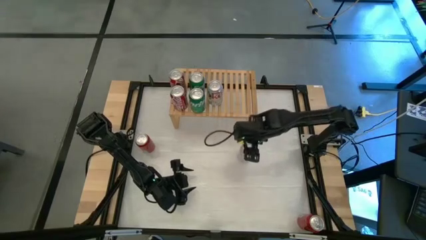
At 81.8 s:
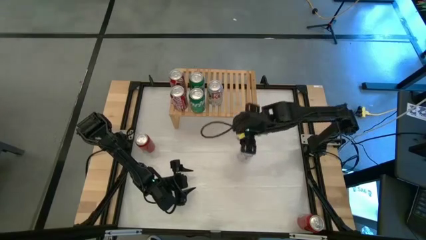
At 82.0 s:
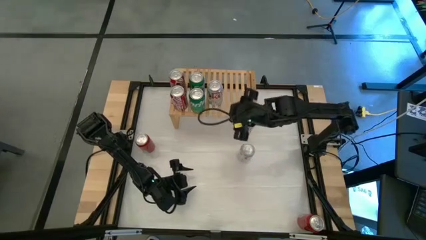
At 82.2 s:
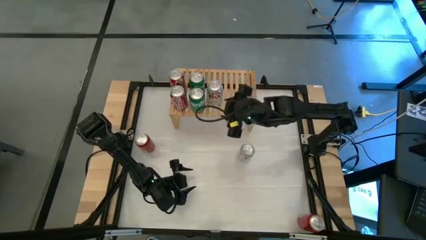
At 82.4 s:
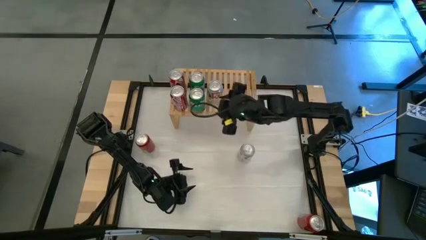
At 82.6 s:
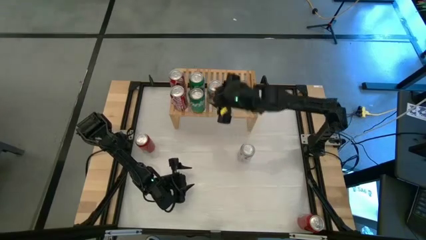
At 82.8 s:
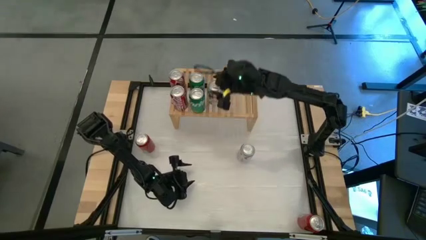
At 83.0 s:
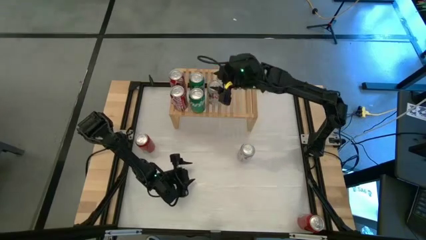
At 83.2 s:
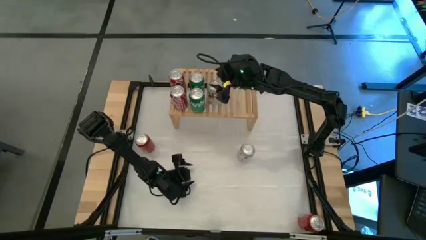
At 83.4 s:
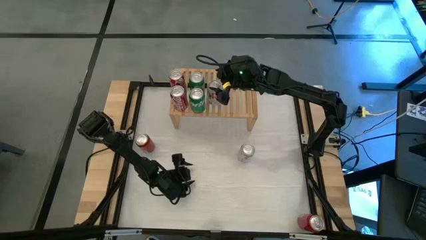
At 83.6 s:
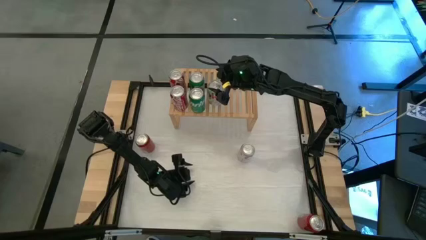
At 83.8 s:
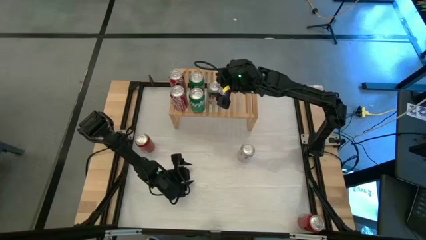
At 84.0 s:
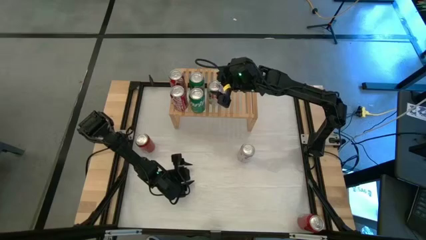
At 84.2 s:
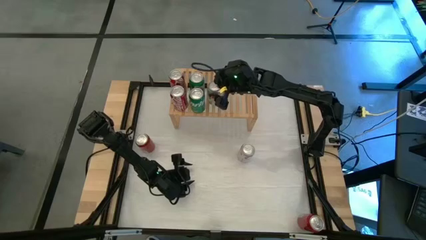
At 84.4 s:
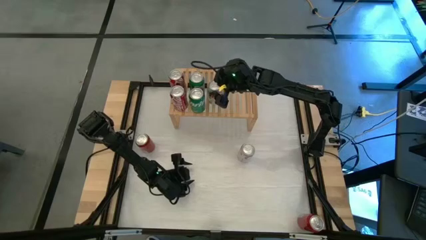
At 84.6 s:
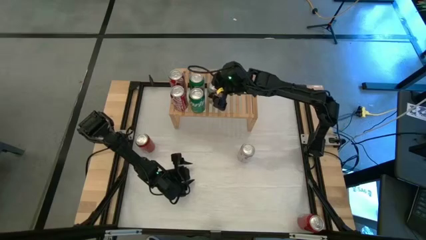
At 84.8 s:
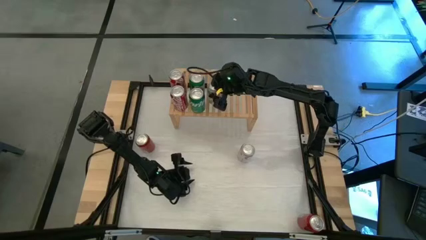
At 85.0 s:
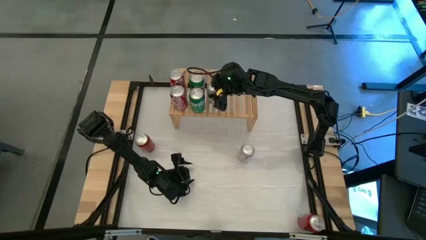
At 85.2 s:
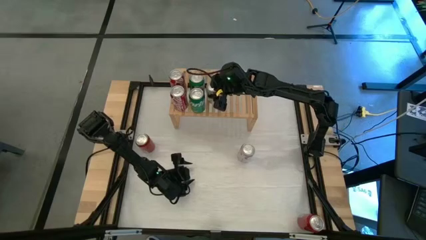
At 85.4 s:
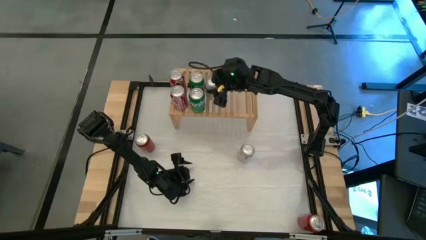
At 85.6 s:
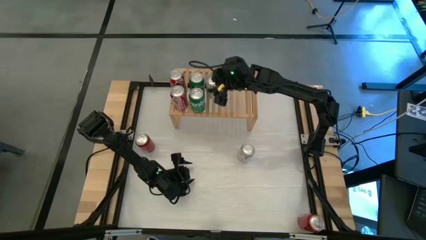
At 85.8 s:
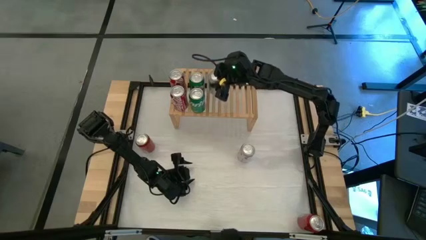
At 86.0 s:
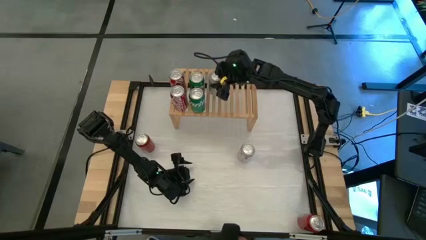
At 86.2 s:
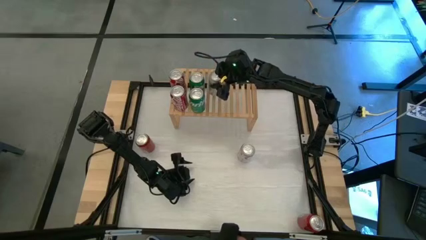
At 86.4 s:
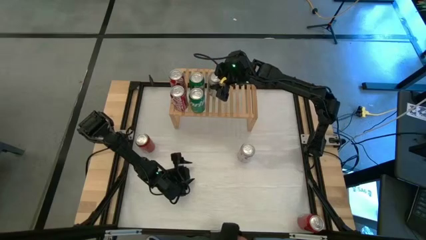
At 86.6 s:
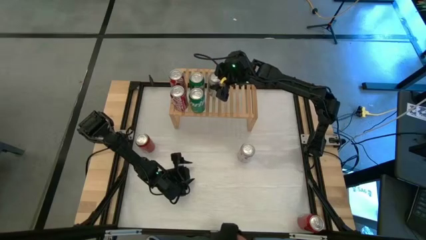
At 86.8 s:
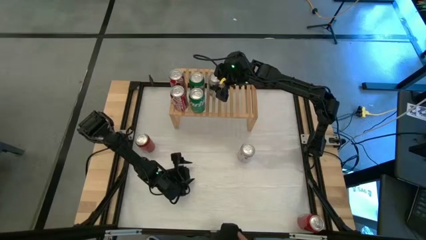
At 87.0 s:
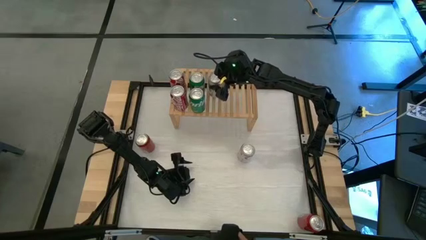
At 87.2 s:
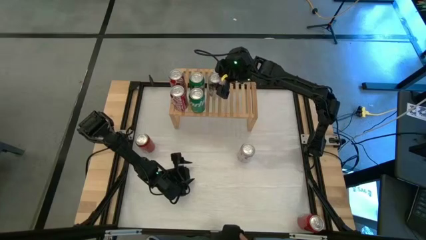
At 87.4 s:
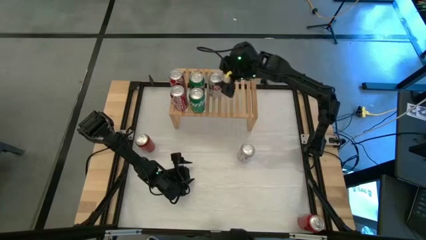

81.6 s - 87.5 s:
Task: Place canned beverage on shelf
Adjust the red silver soda can on the shelf

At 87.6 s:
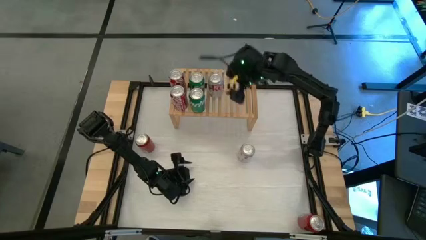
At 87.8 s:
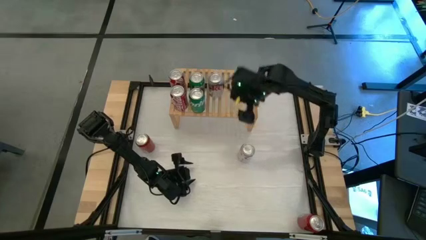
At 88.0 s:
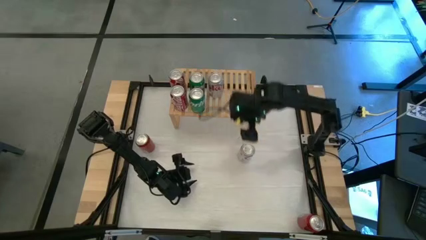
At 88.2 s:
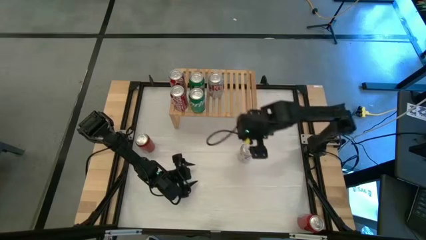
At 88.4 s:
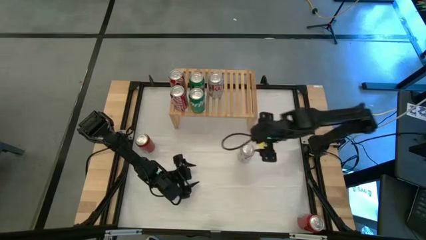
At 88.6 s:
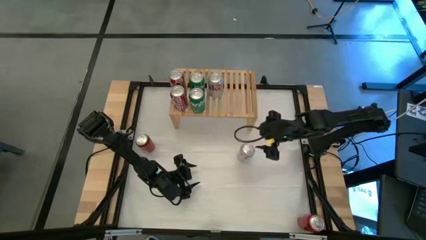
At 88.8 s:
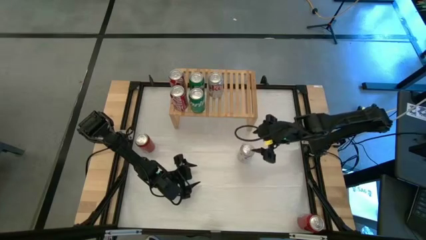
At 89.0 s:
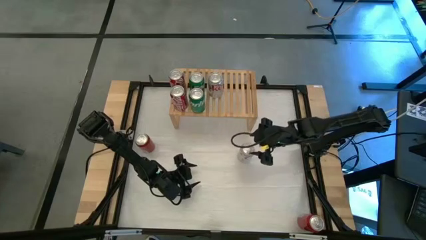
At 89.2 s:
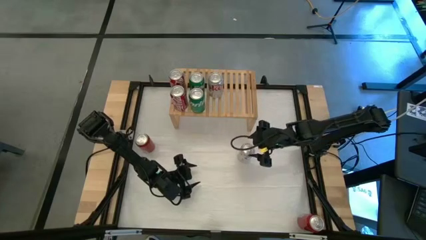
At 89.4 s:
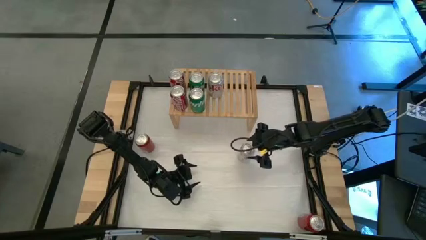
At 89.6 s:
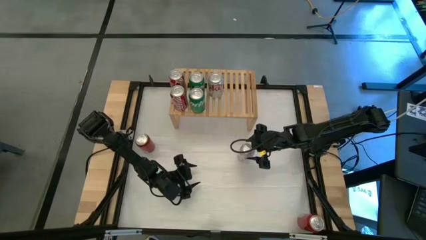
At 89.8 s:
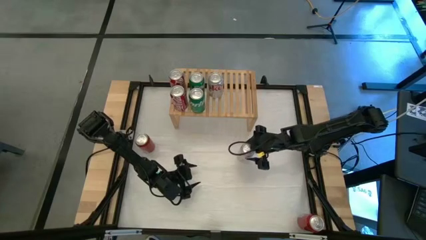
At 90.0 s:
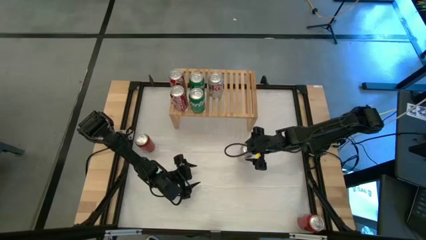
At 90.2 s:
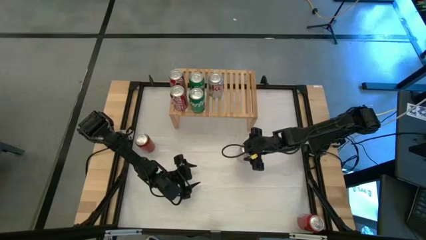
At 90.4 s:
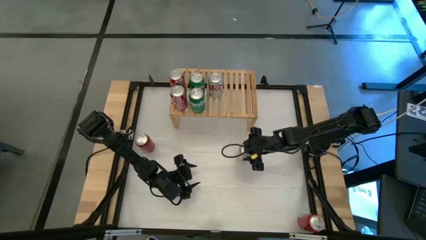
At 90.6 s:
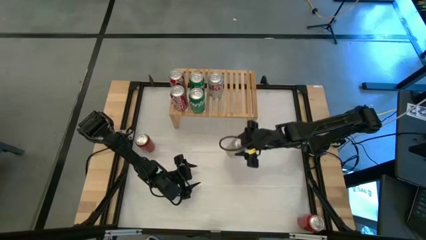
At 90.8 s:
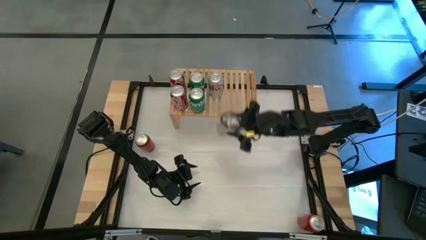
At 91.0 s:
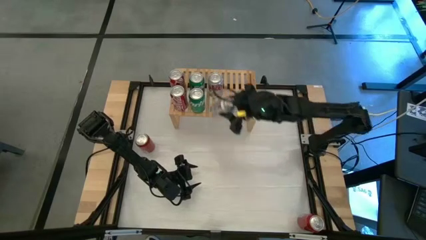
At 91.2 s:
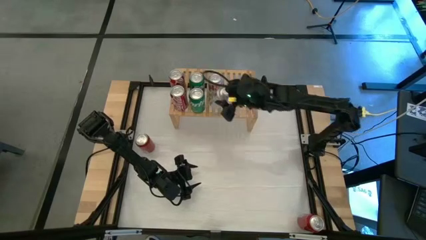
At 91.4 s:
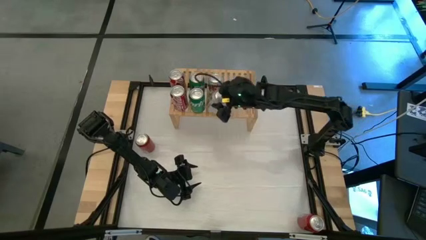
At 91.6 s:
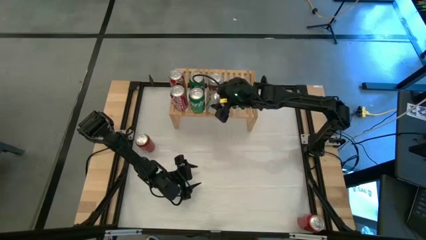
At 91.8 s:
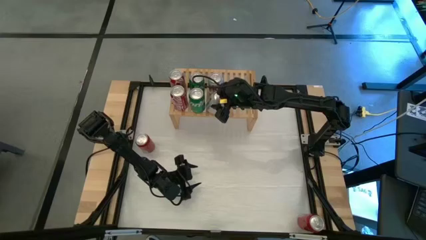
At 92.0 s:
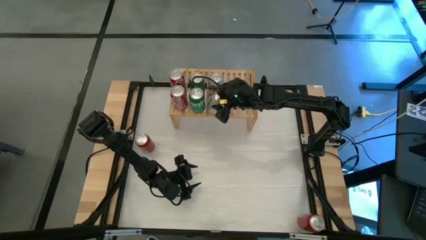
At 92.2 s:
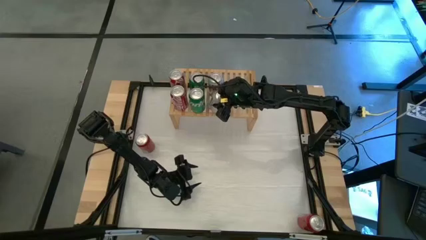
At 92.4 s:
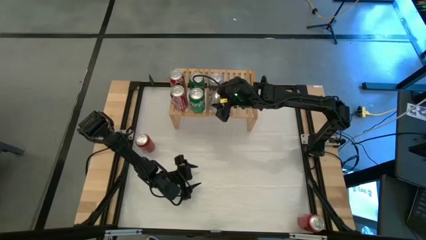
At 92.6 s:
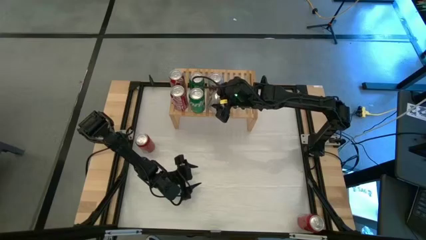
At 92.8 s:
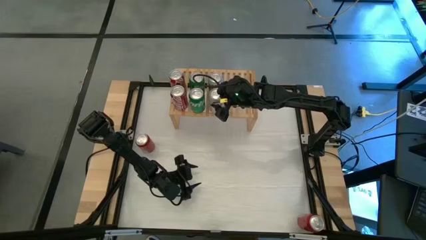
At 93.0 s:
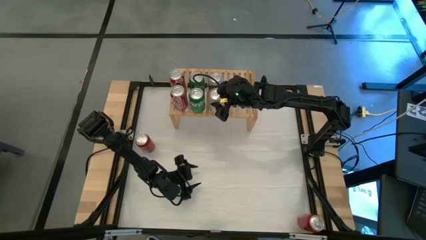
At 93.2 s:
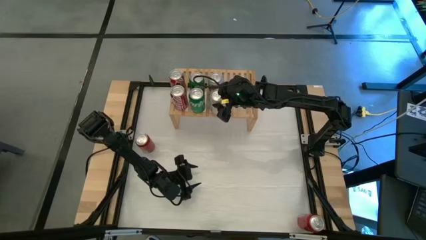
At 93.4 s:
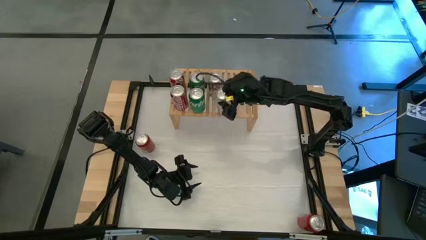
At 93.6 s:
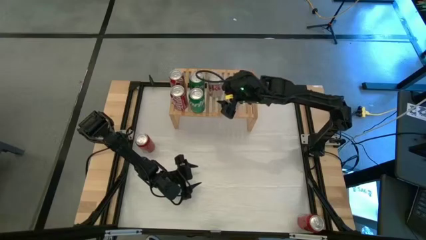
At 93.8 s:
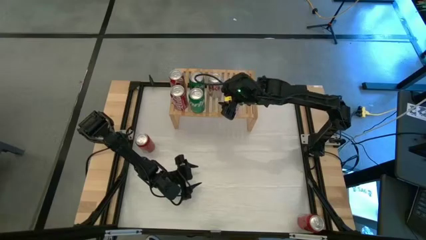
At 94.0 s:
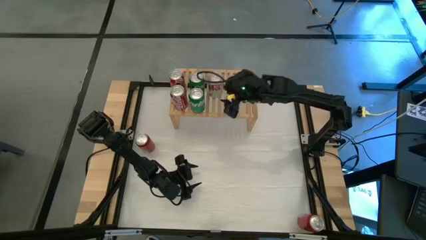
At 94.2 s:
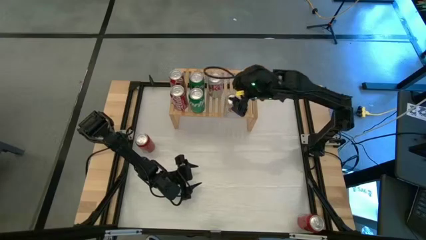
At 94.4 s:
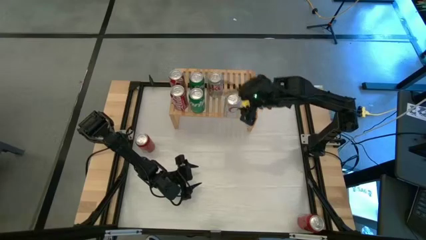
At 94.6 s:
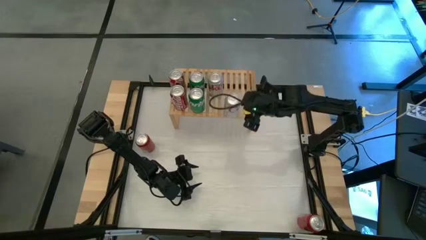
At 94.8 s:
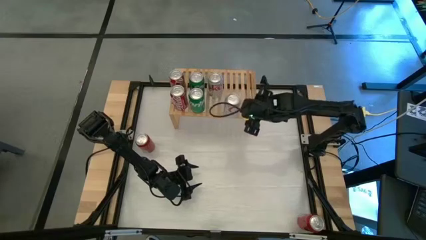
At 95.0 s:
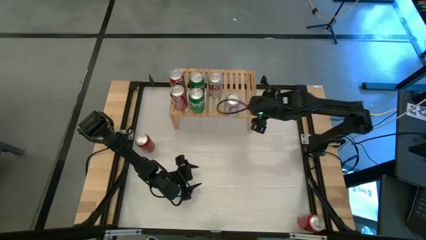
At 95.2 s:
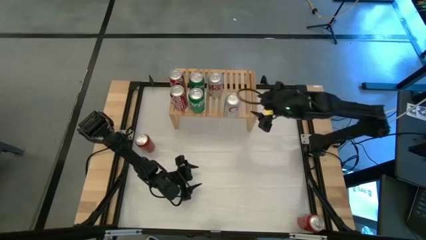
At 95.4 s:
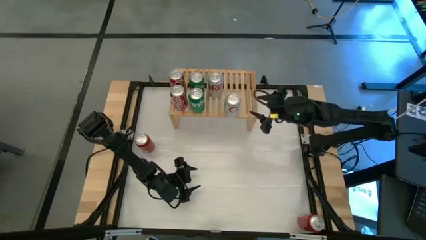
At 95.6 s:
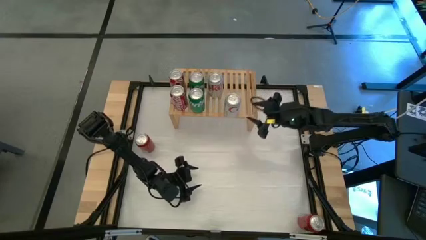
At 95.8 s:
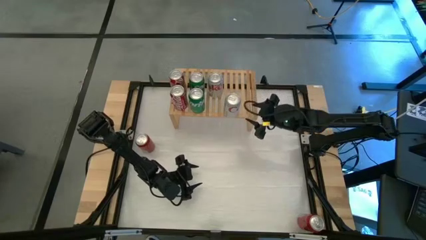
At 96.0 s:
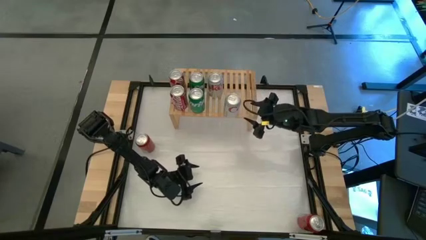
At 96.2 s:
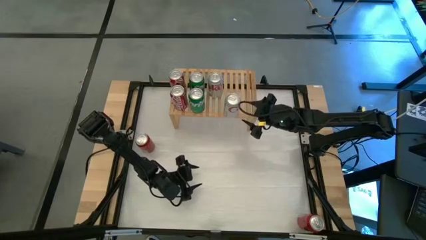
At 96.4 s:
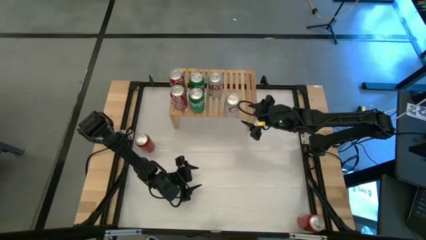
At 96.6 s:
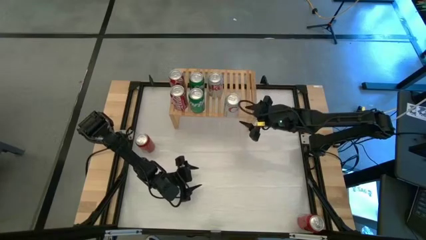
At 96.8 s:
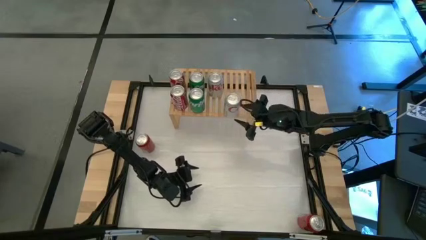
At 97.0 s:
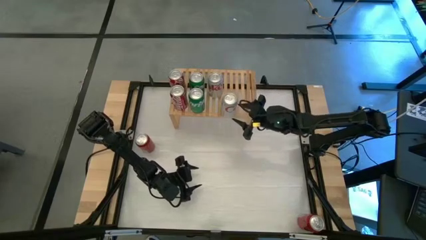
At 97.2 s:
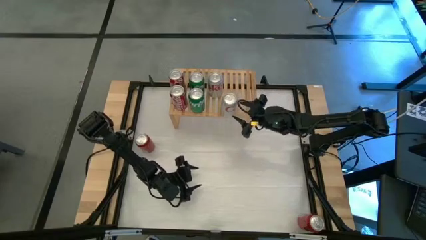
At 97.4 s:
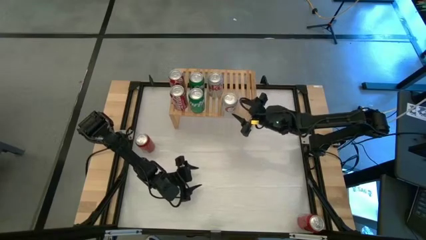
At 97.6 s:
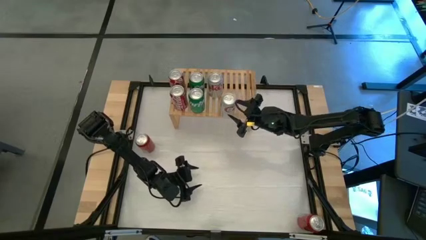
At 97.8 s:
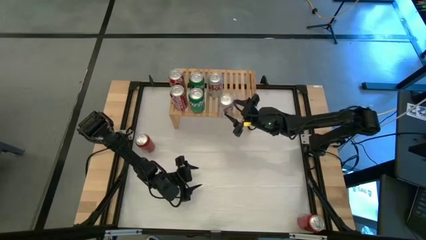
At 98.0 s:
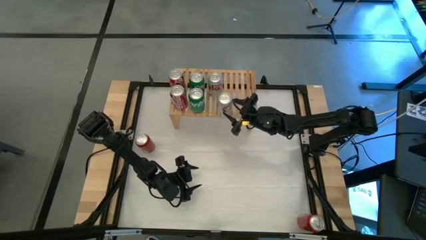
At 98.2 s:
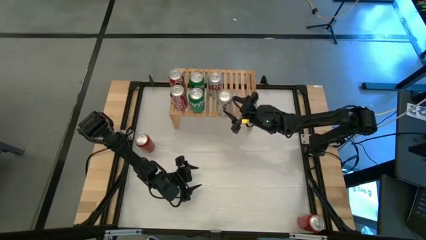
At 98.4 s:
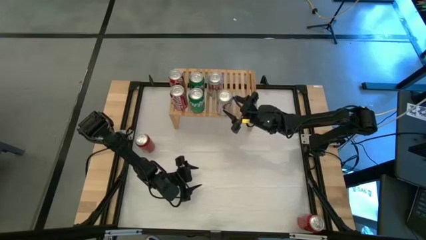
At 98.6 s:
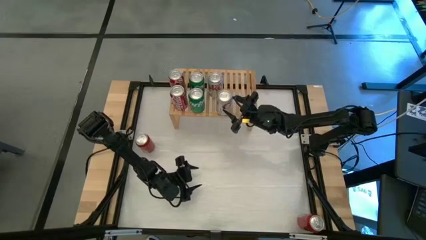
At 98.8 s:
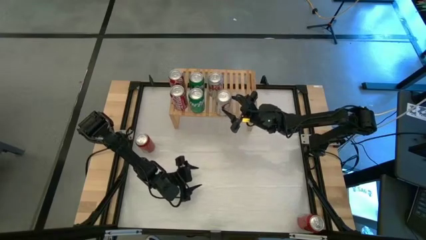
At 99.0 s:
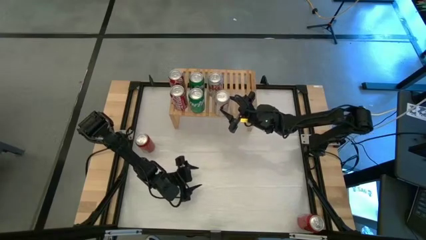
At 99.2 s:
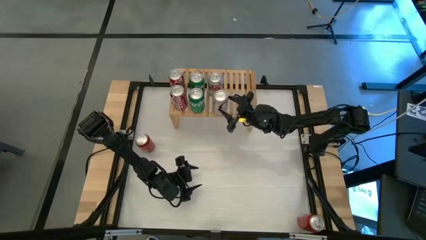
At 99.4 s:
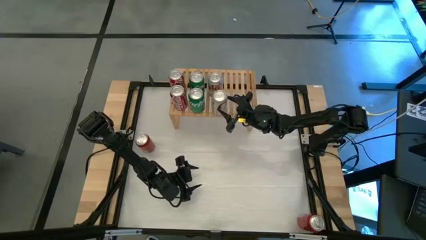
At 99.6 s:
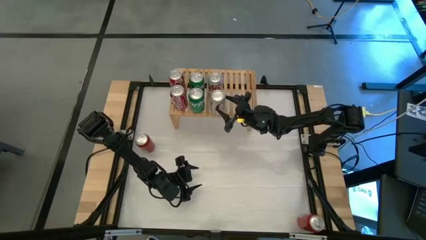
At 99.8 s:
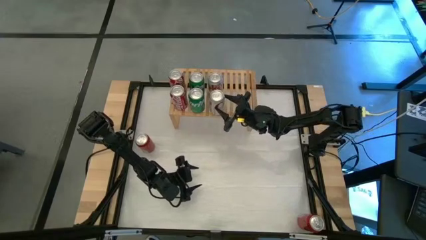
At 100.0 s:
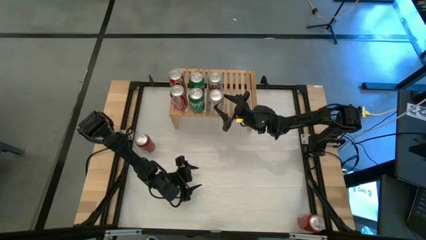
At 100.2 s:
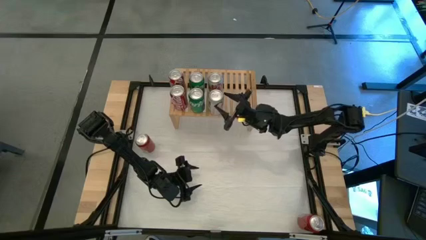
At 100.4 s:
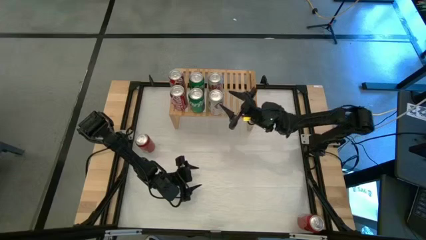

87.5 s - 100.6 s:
Put the red silver soda can on the shelf aligned with the other red silver soda can
